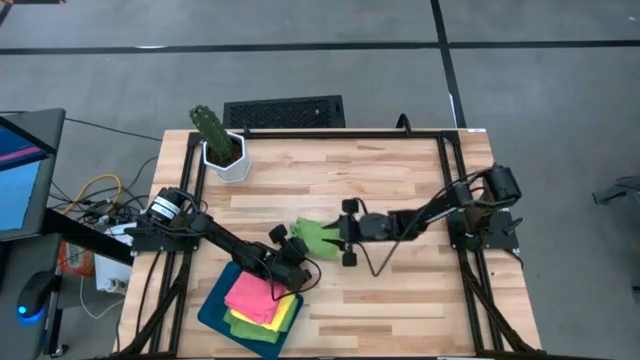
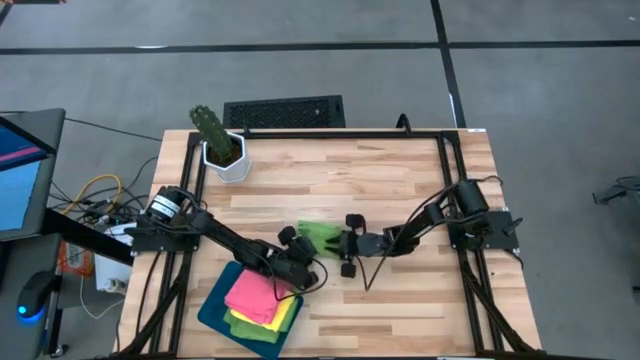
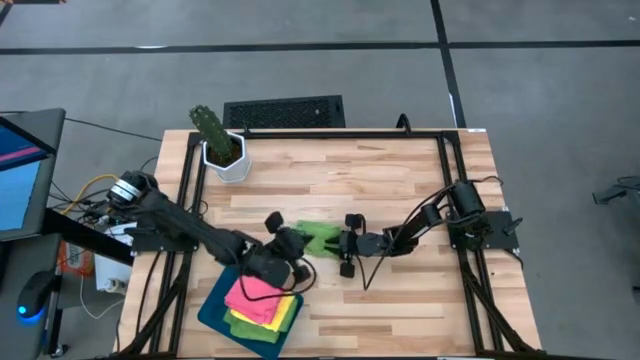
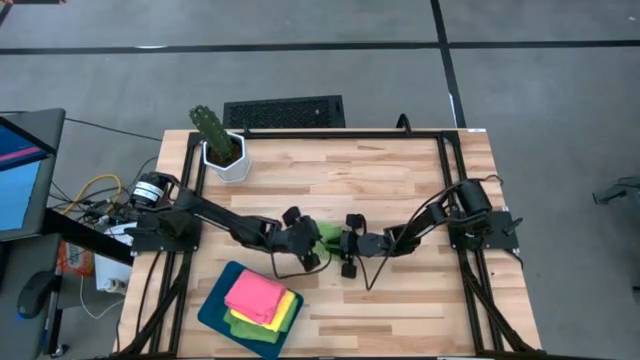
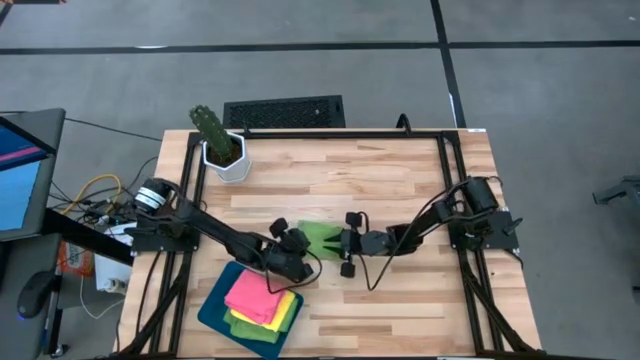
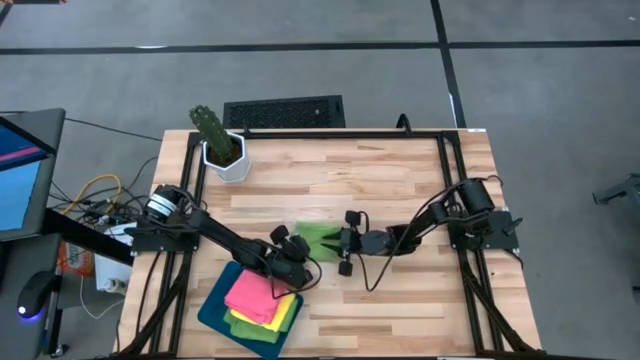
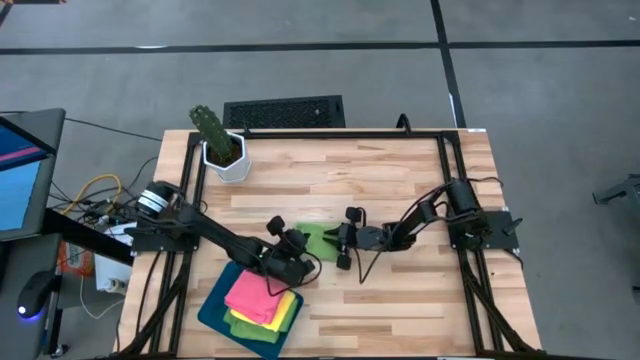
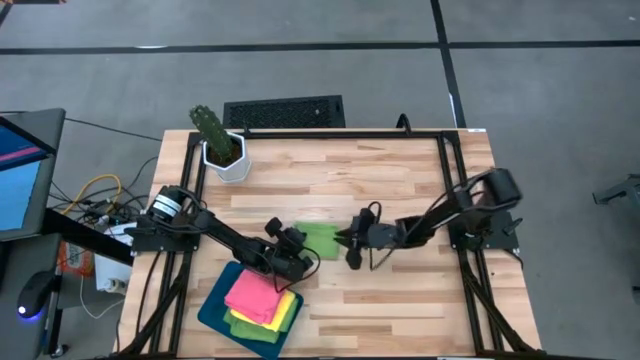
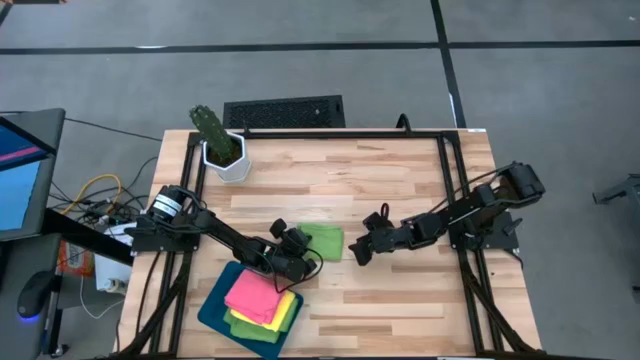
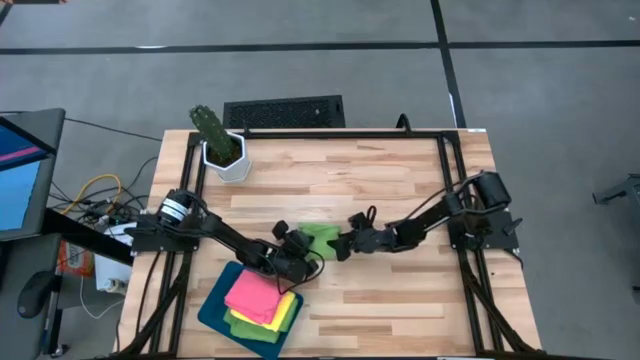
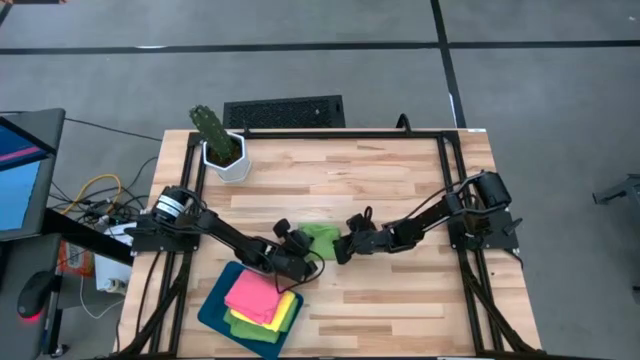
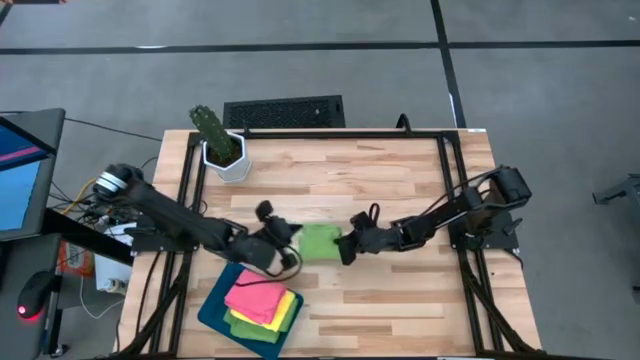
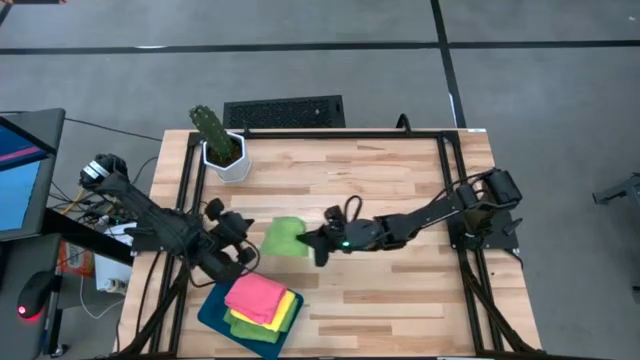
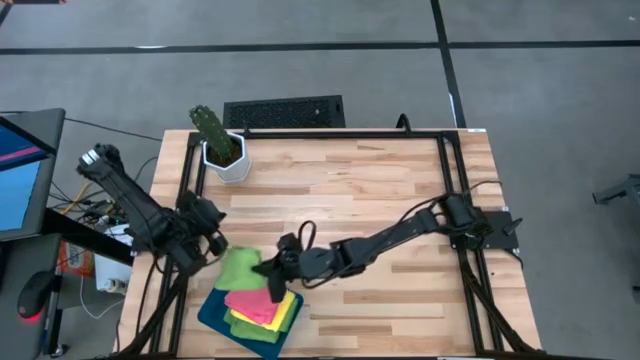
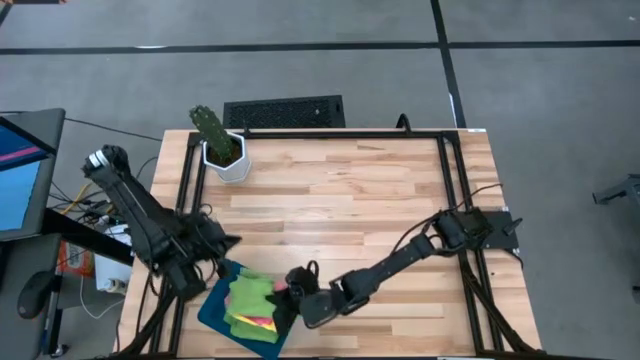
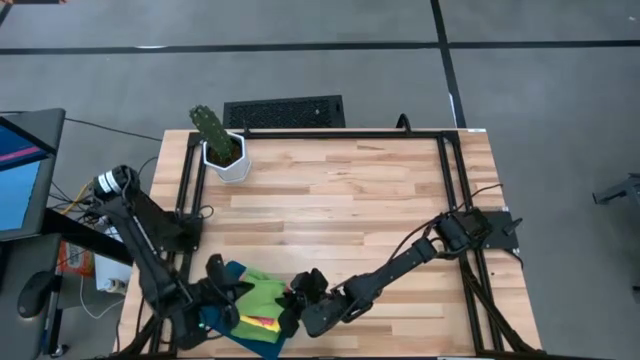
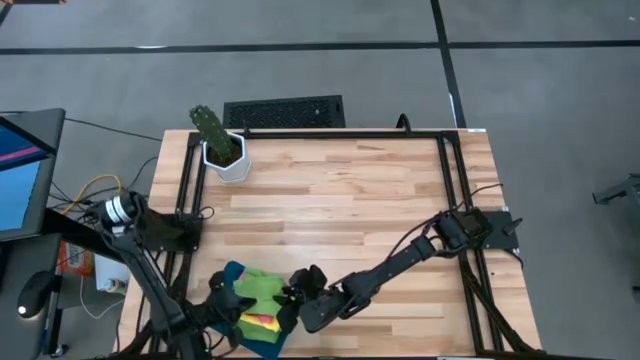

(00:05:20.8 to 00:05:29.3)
Task: Fold microfiber towels
Stack the folded green microfiber on the pink microfiber cloth in the blue bin

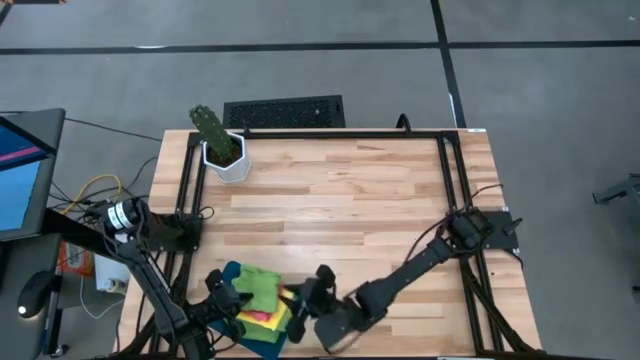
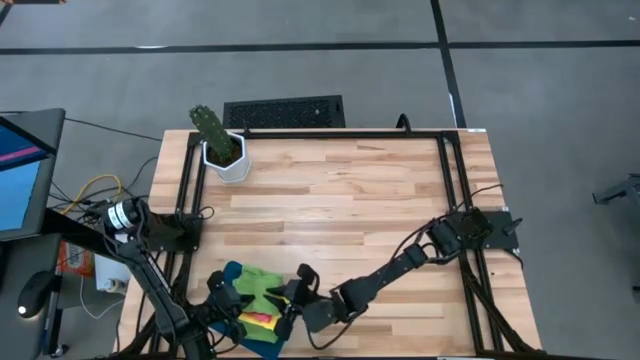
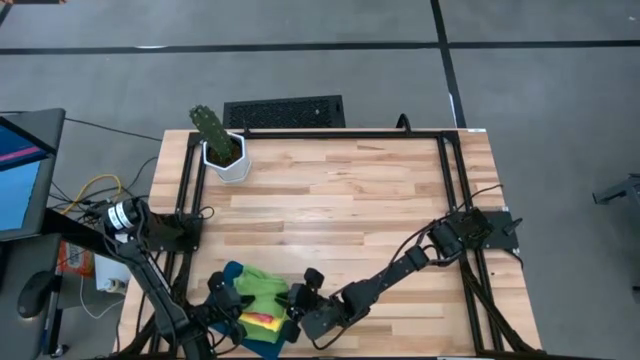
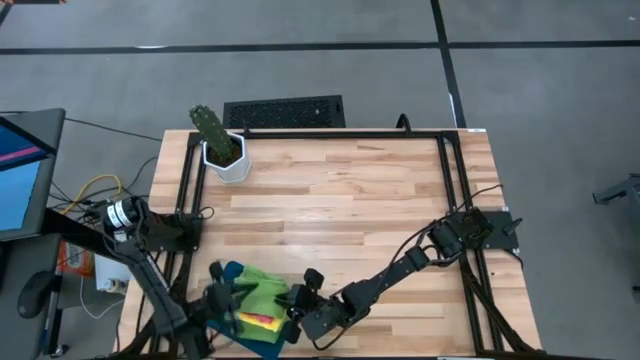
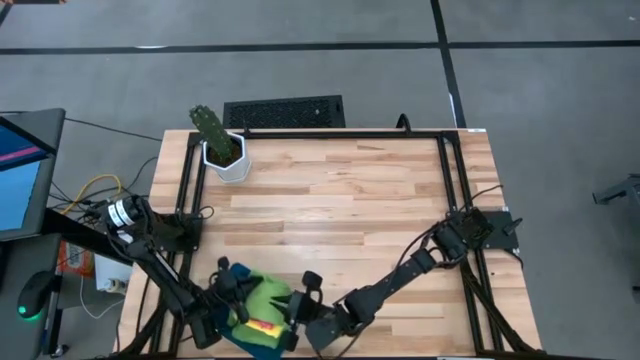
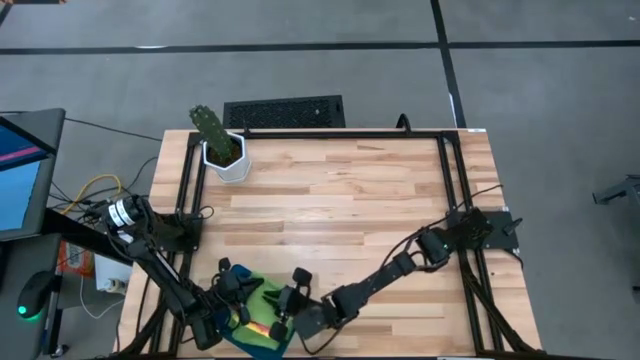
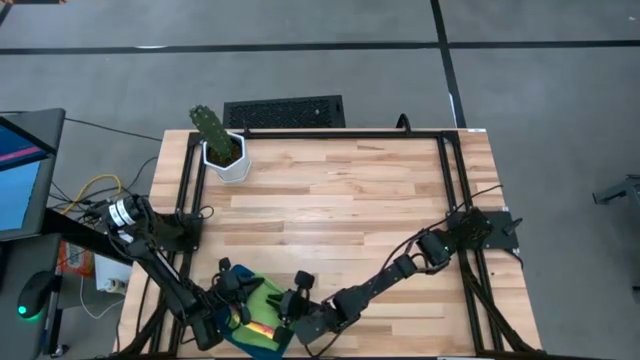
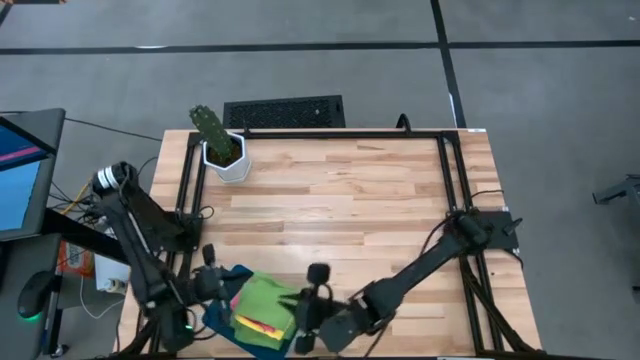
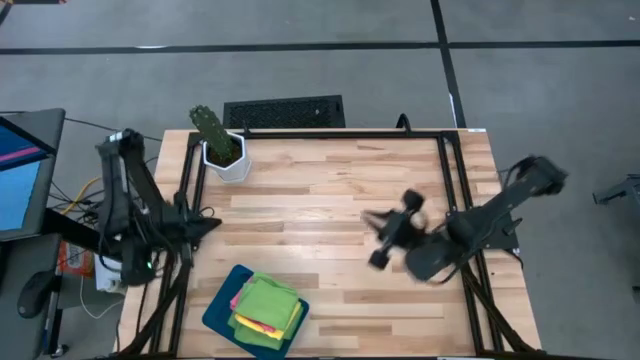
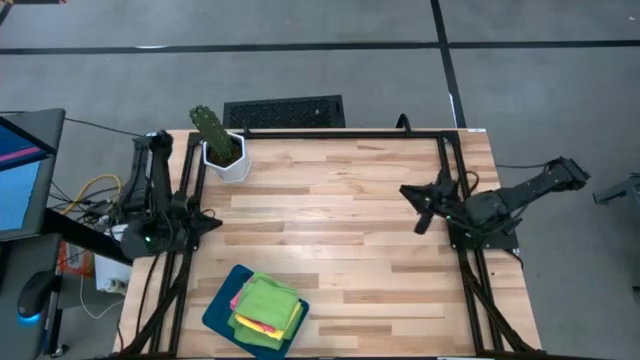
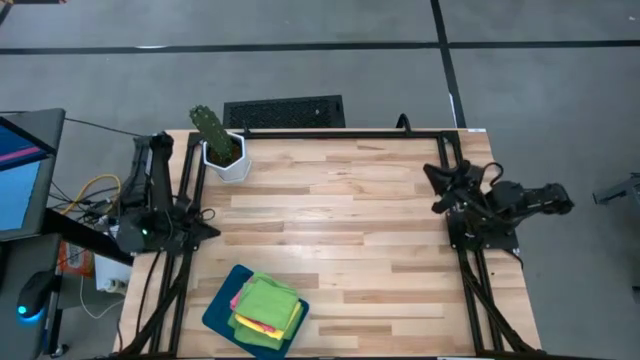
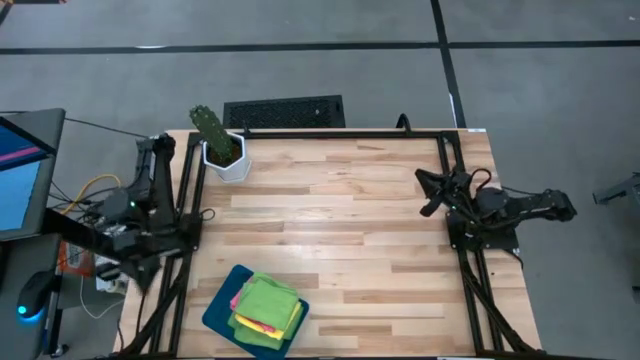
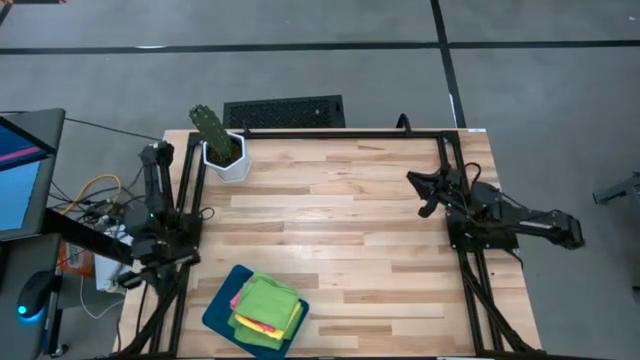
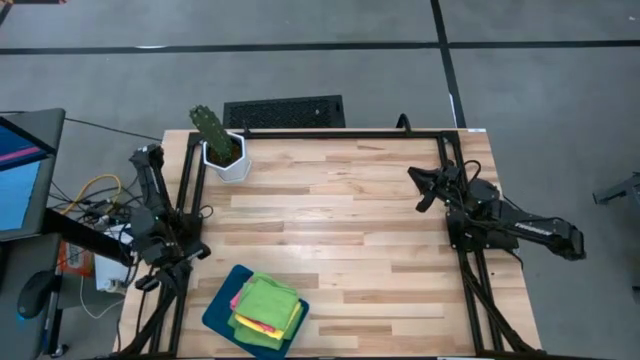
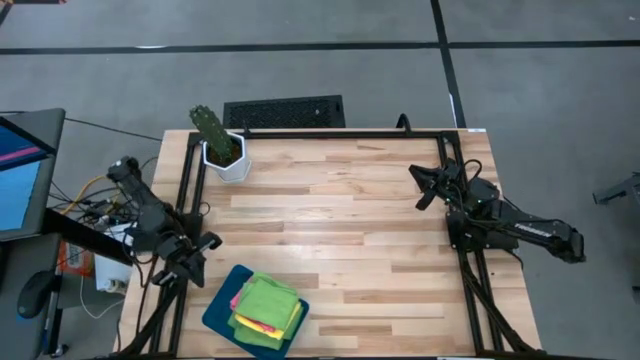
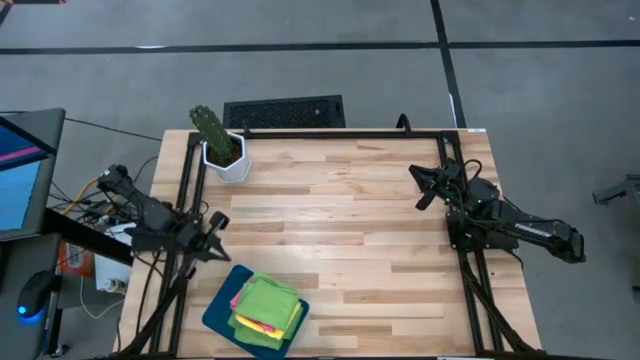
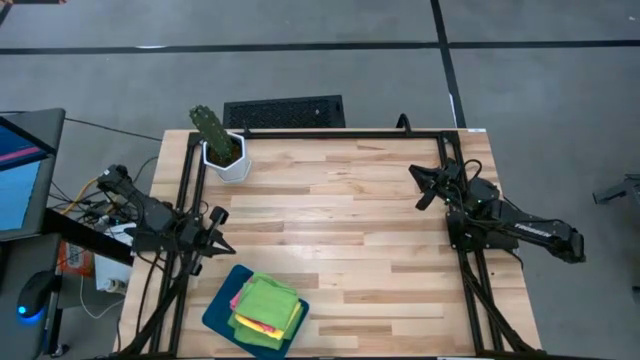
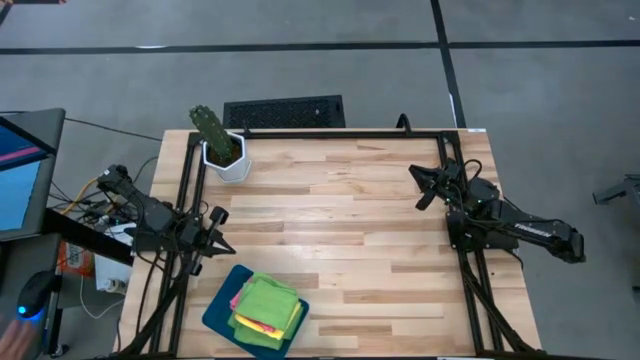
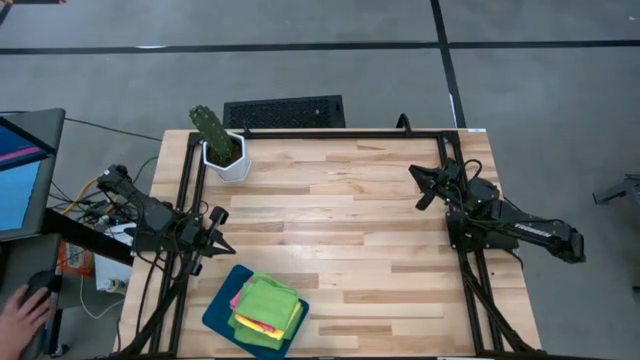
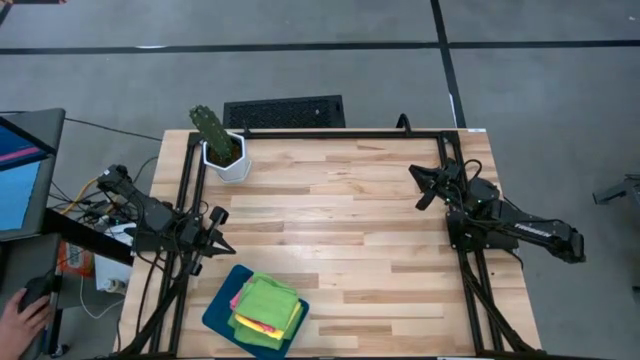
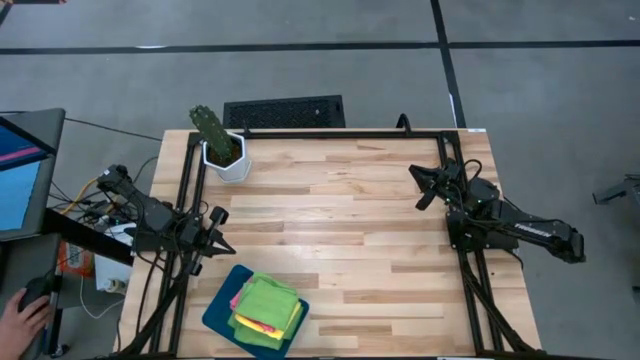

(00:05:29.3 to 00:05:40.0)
Return to Home Position

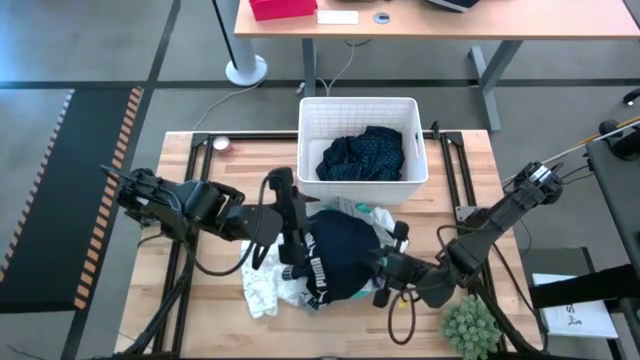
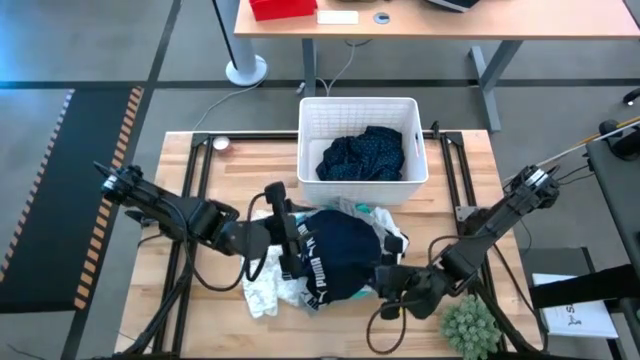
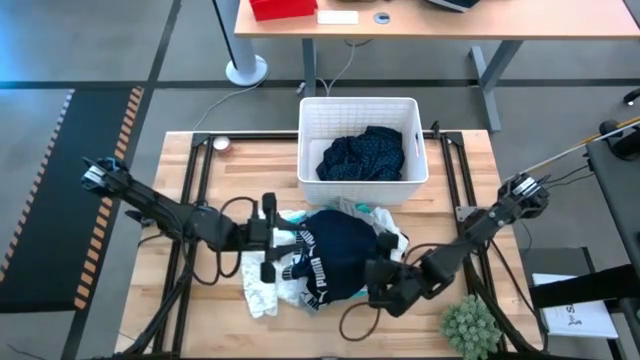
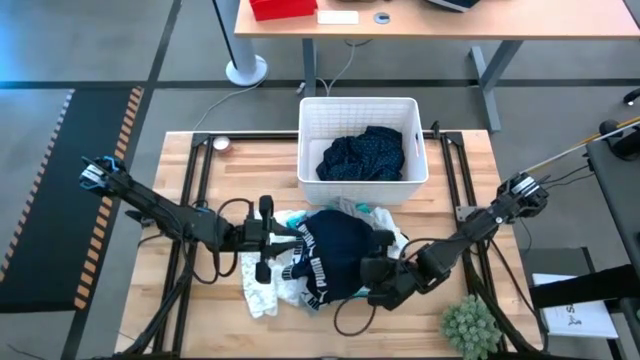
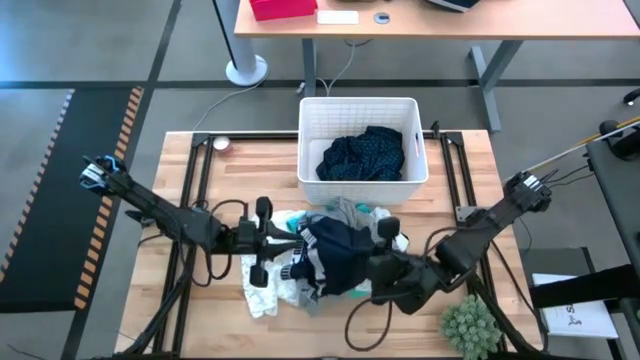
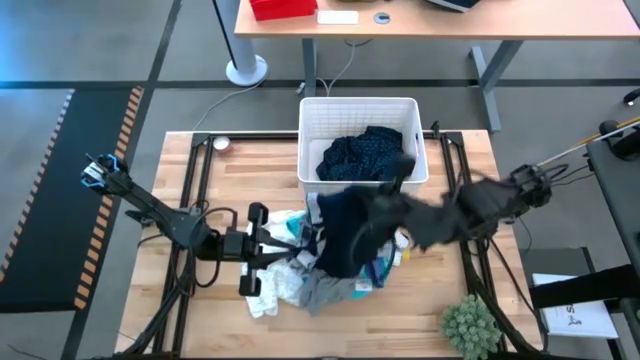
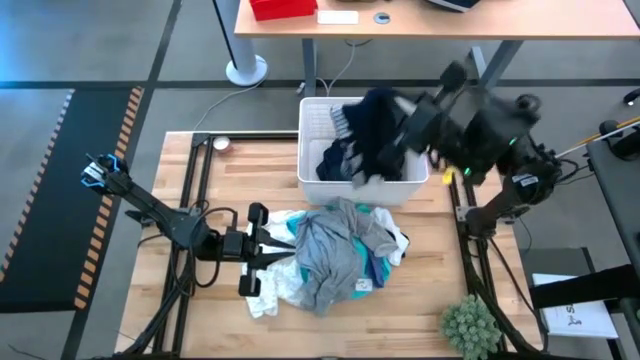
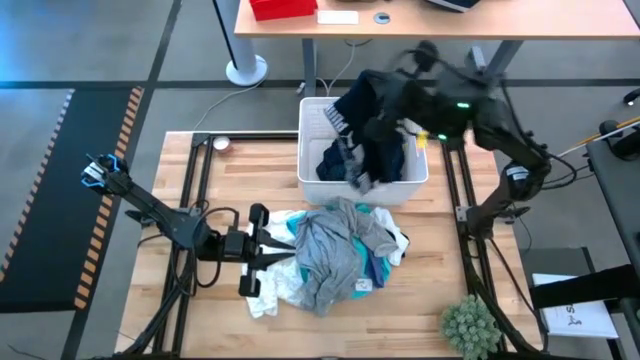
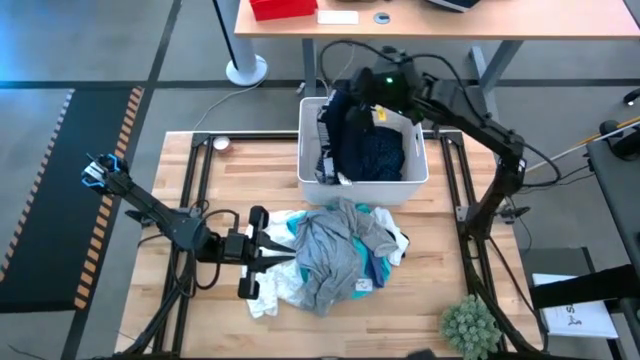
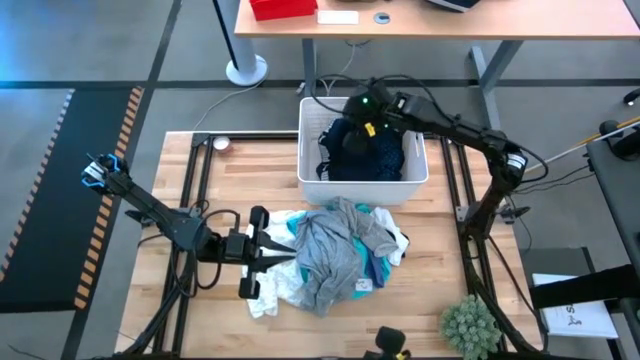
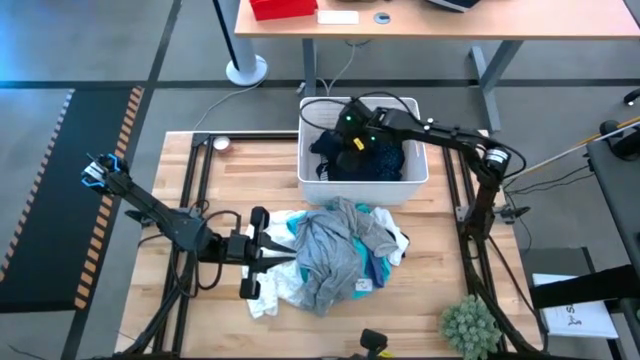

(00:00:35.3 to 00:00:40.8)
Task: Sort clothes
Put the black boxer shorts into the white laundry bin
